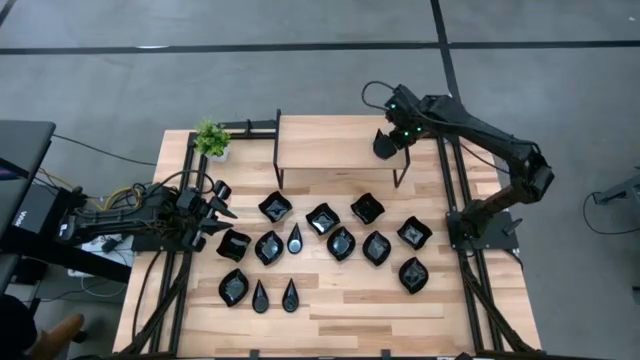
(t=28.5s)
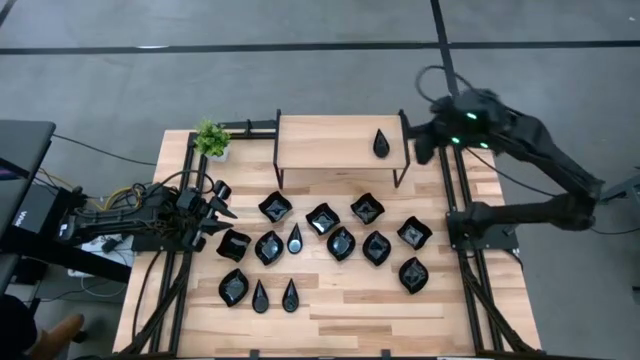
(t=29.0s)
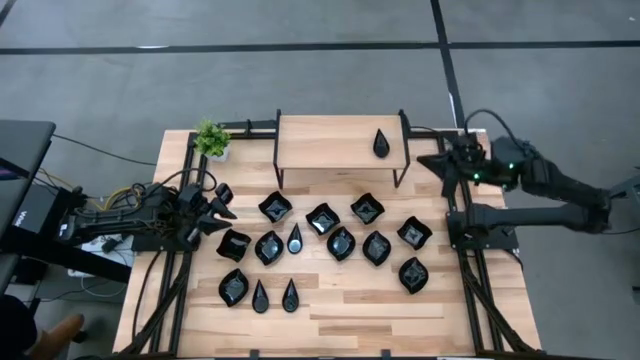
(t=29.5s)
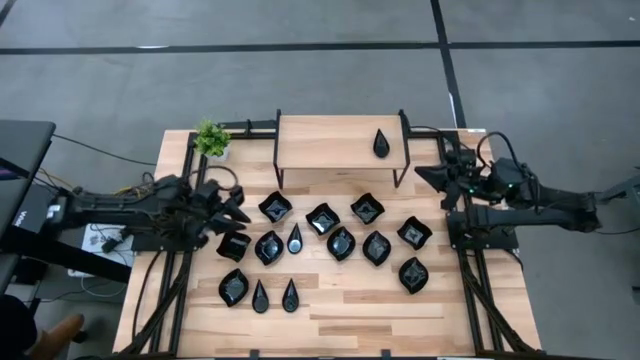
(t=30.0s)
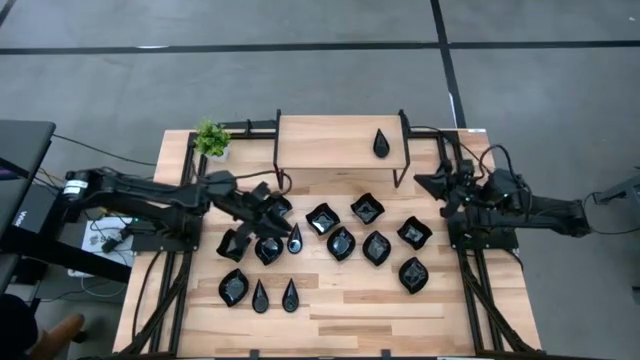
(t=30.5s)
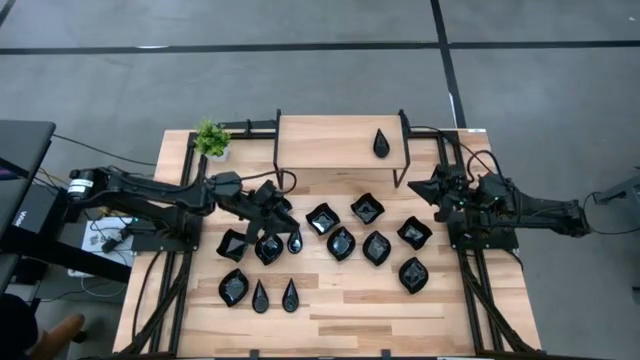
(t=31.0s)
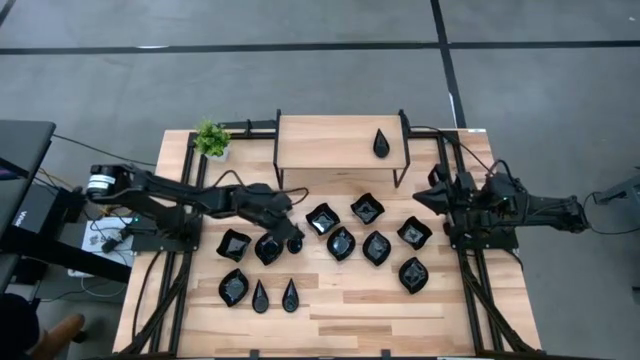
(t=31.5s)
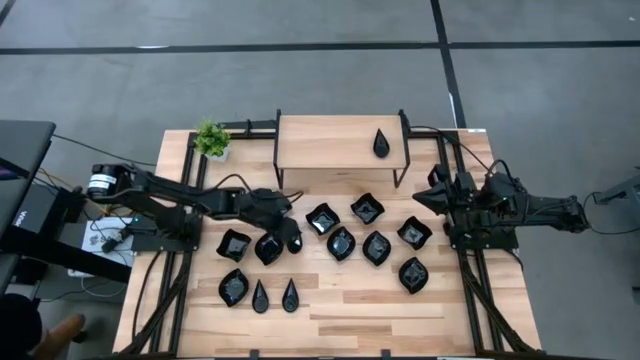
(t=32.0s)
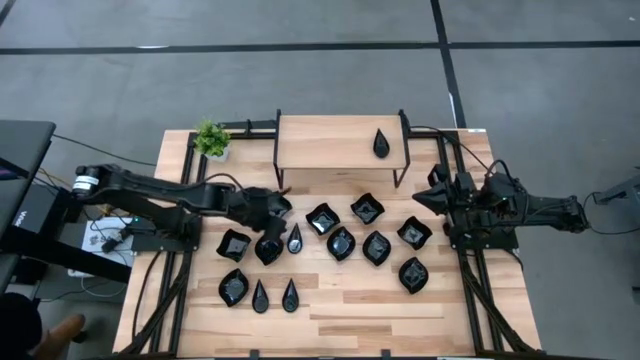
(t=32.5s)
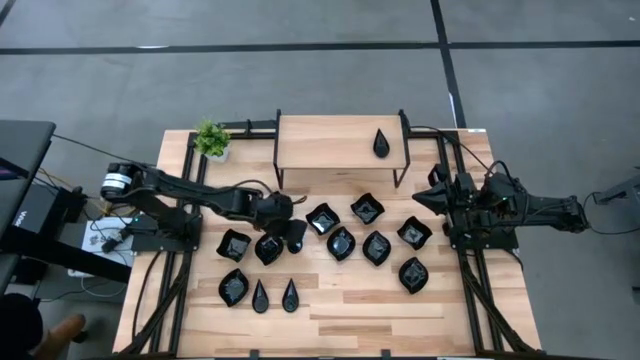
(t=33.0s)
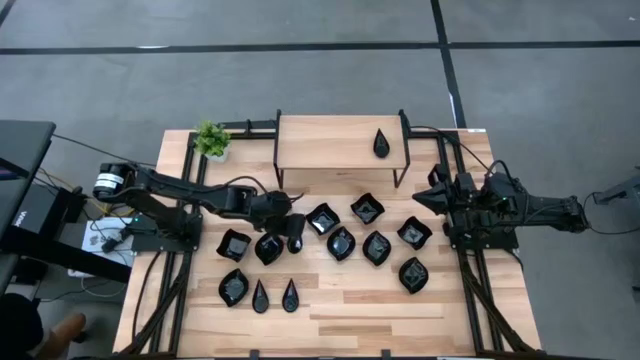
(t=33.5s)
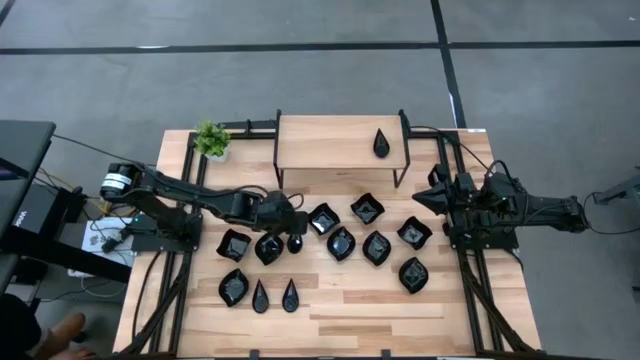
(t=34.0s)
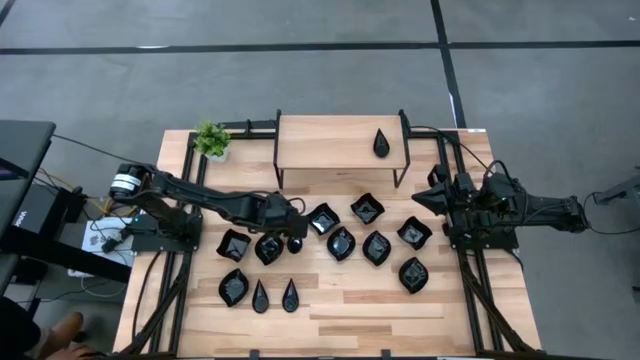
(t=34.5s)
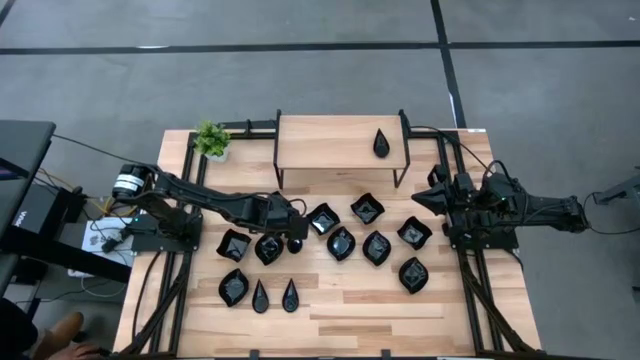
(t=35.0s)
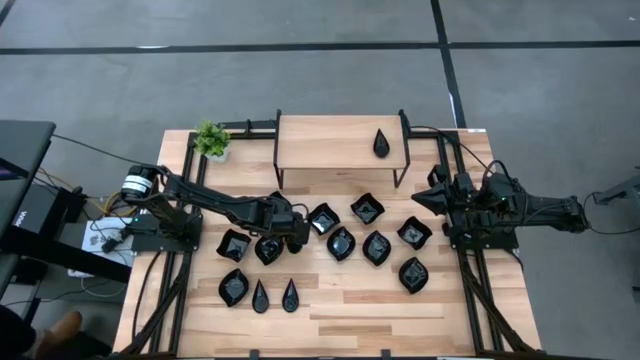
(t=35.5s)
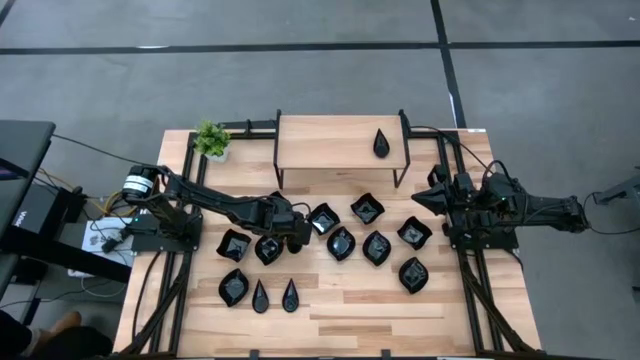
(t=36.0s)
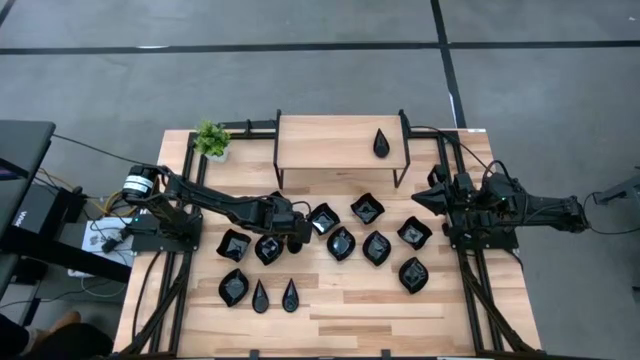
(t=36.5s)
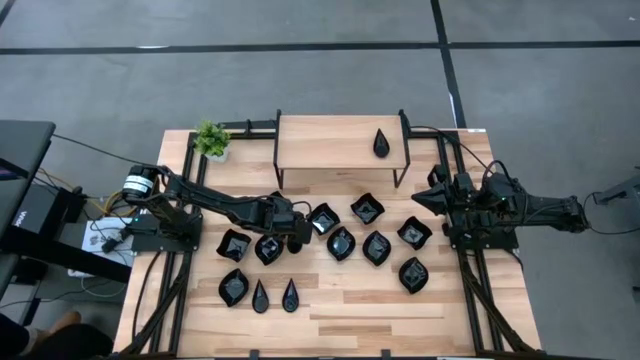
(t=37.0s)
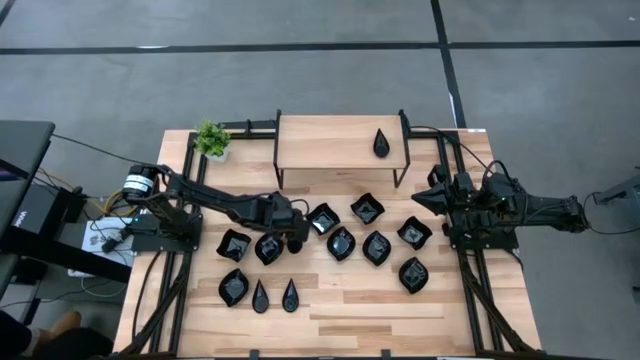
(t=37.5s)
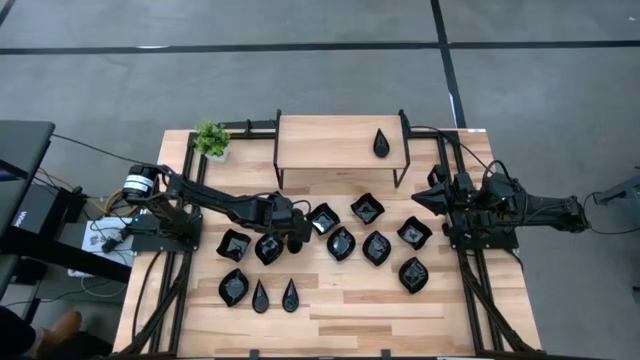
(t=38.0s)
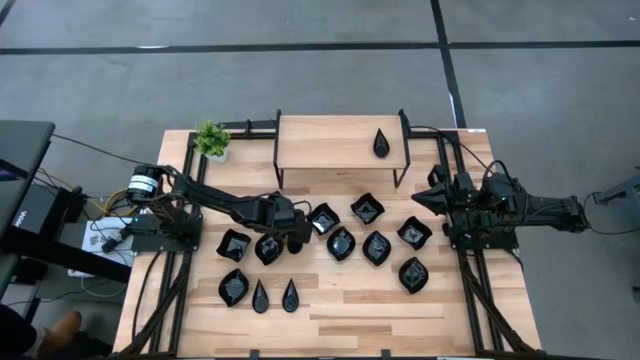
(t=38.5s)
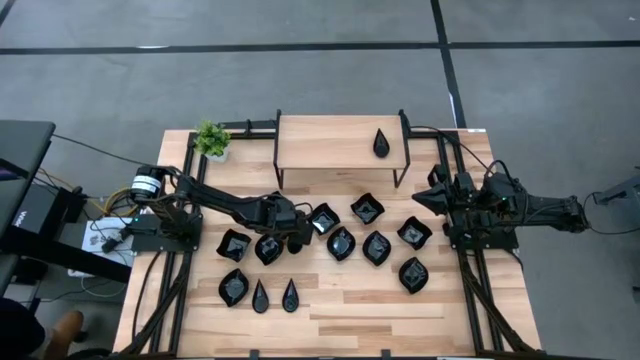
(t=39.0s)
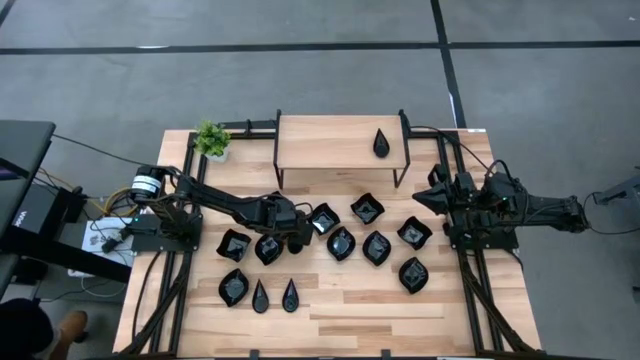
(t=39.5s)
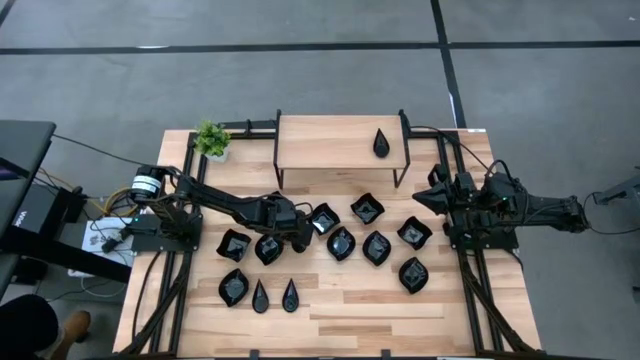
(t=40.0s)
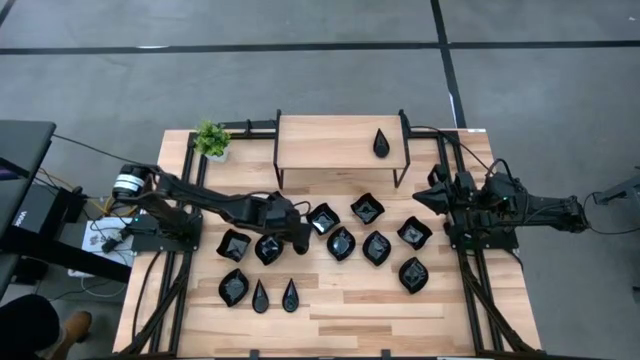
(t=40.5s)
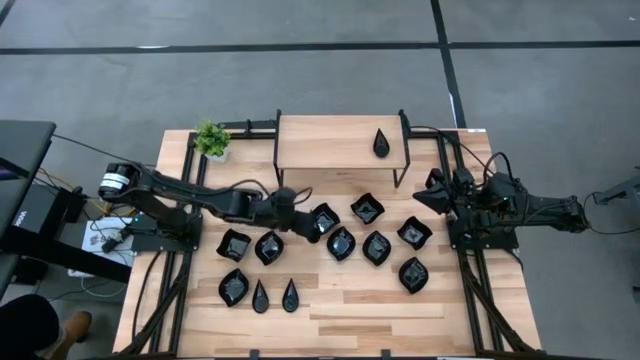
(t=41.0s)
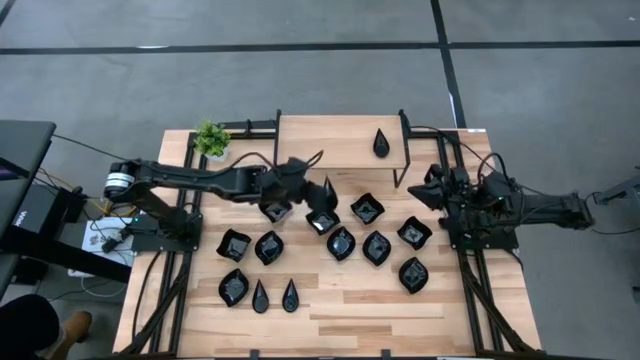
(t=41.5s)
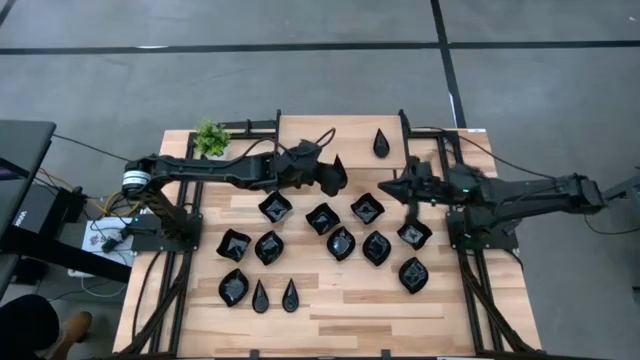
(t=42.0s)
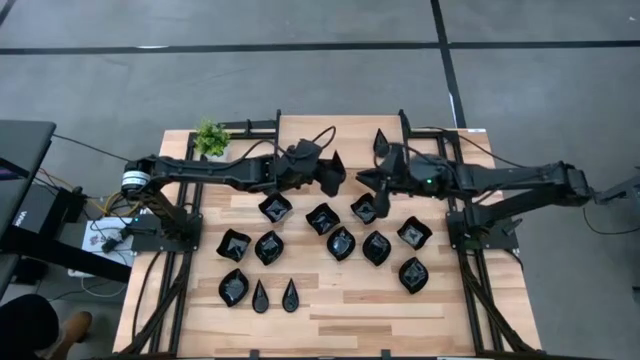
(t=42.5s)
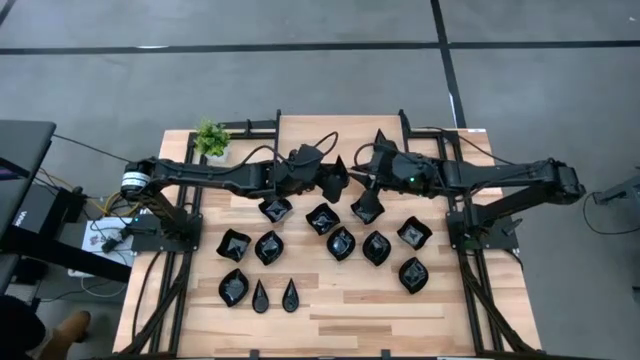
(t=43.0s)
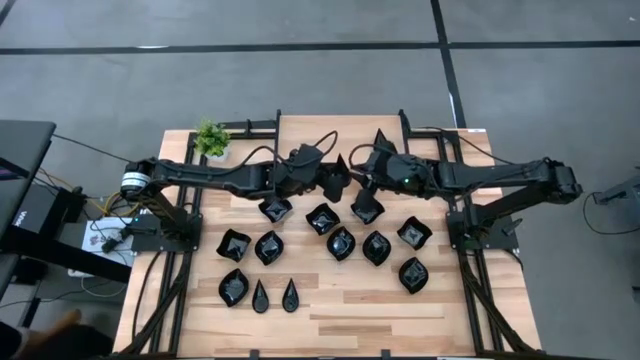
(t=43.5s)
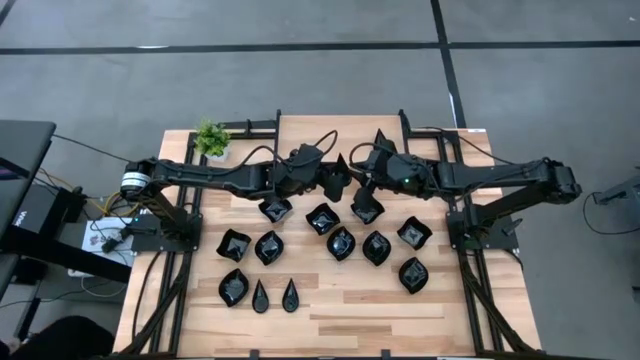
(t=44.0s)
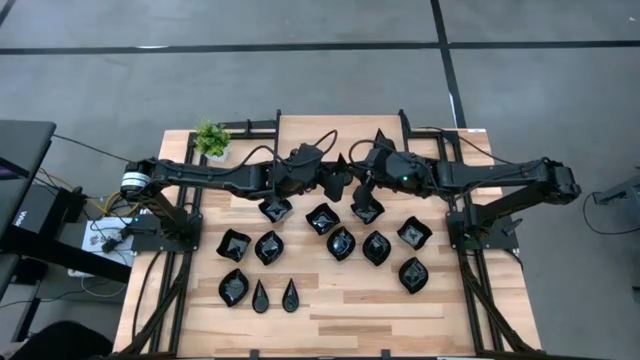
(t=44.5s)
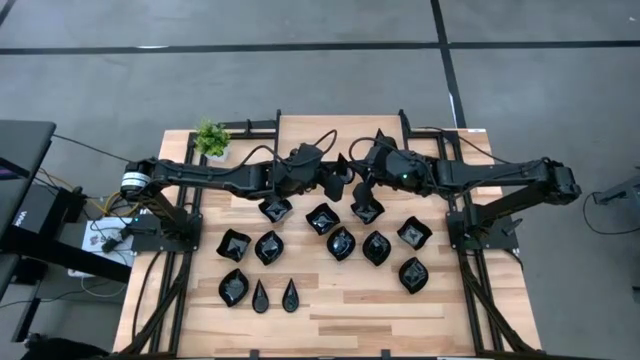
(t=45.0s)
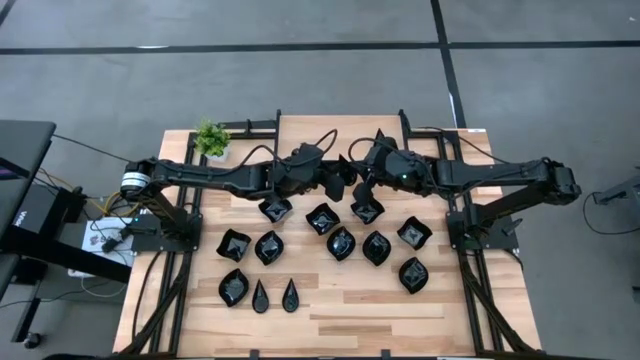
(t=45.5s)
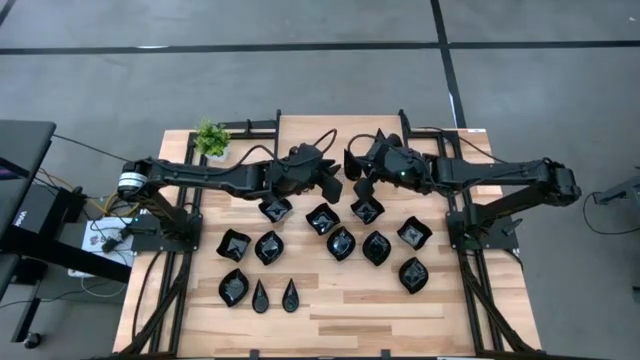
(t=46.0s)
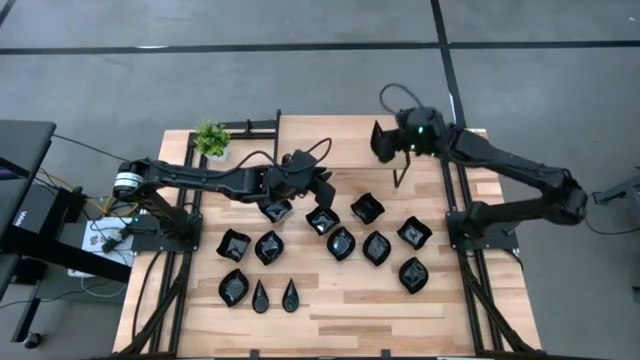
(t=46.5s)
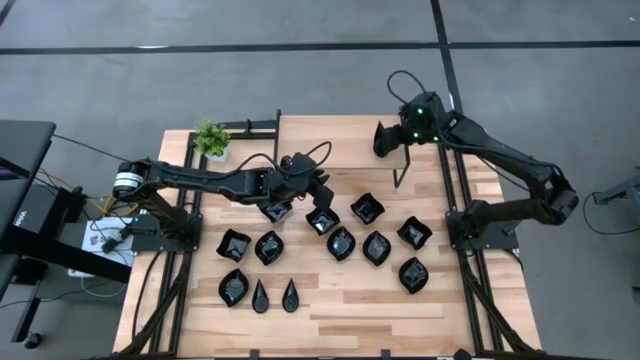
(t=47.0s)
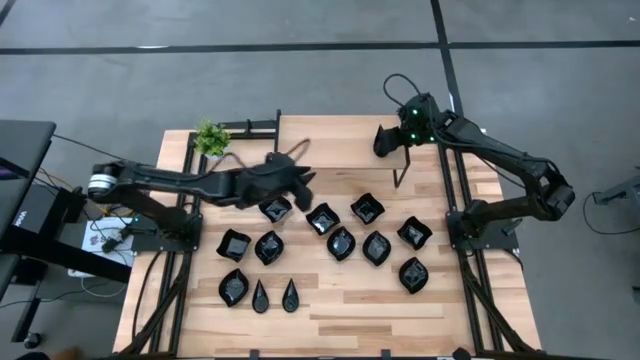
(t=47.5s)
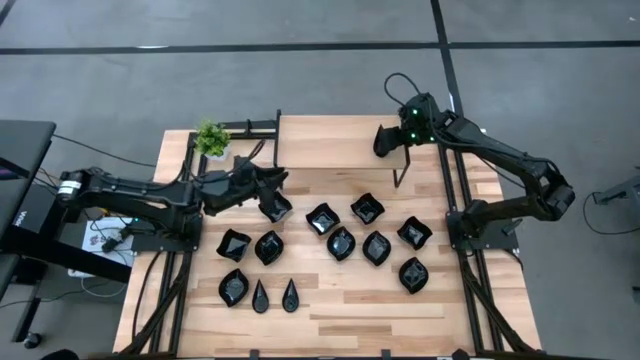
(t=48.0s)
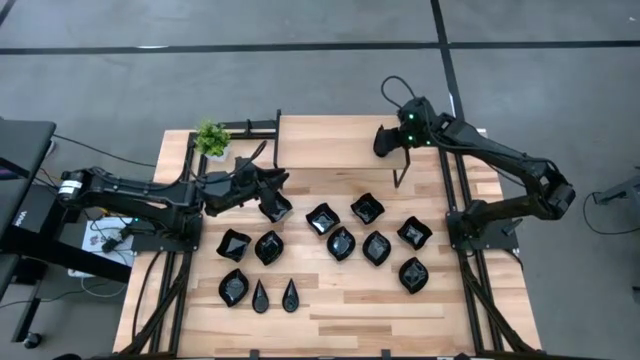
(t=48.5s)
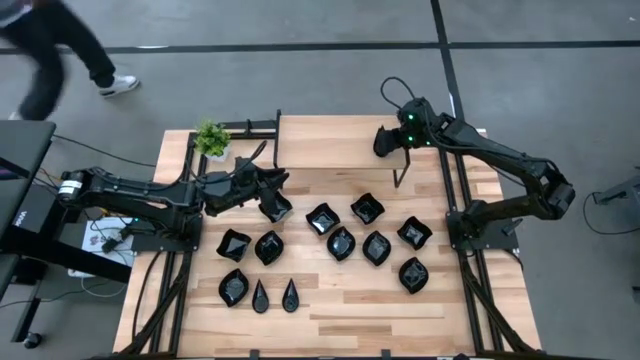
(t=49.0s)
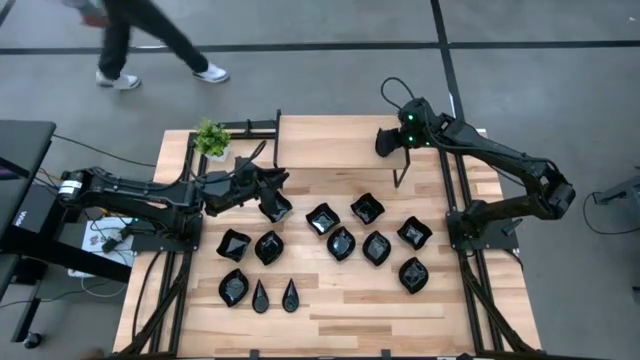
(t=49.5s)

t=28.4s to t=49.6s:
Task: Pick & Place Mini shaped plates
Stack the black plate on top of the black plate on the shelf
